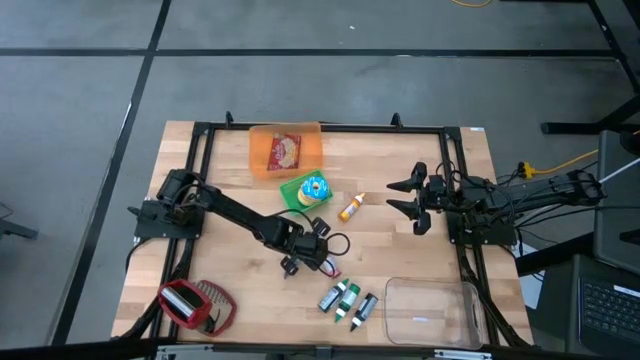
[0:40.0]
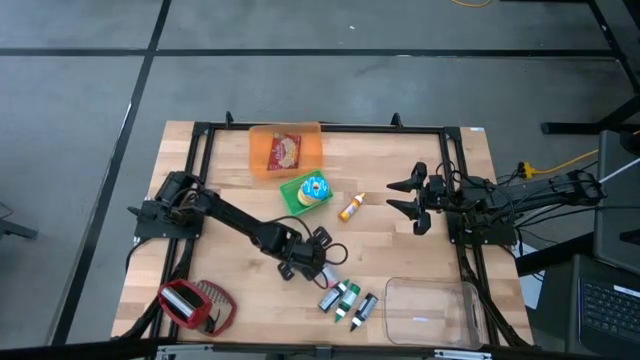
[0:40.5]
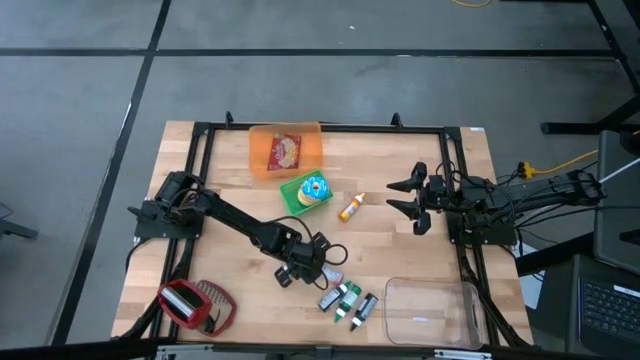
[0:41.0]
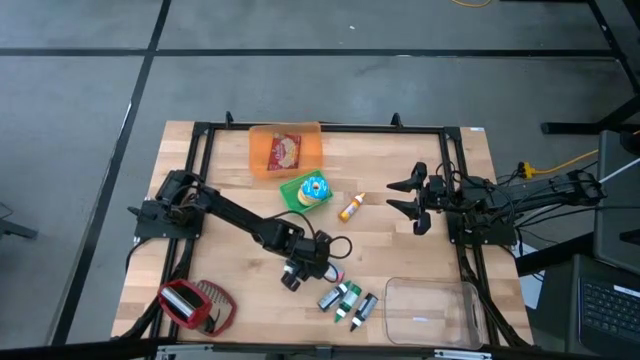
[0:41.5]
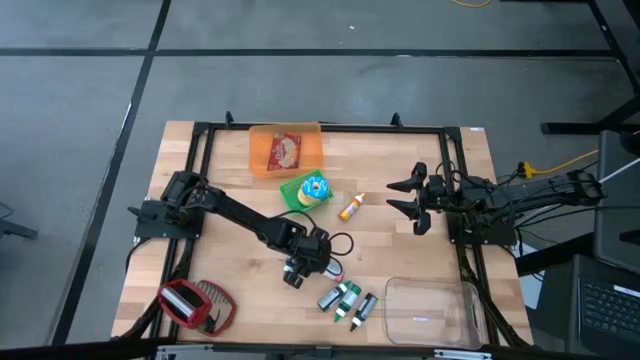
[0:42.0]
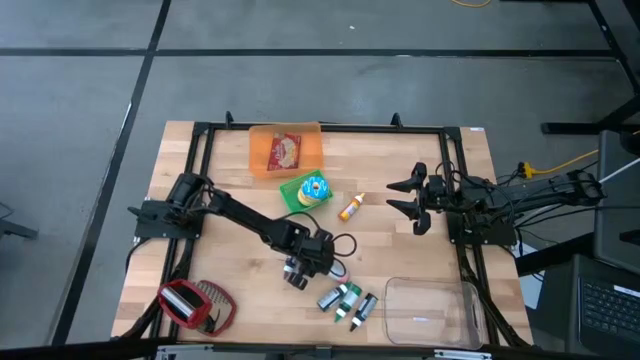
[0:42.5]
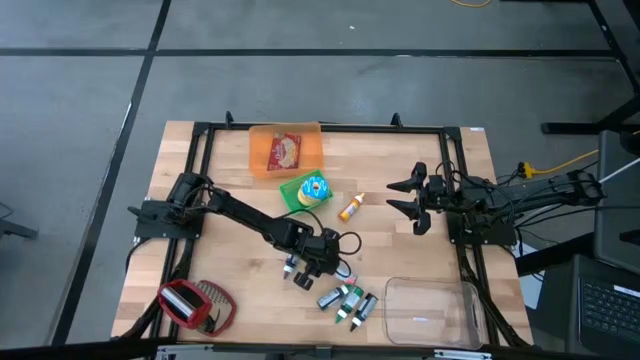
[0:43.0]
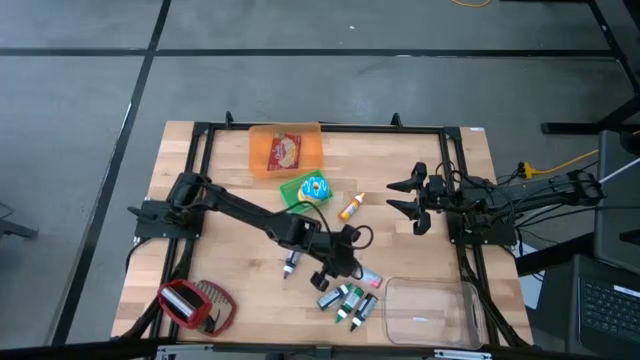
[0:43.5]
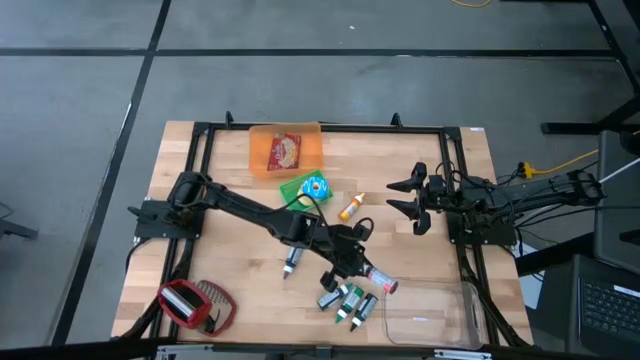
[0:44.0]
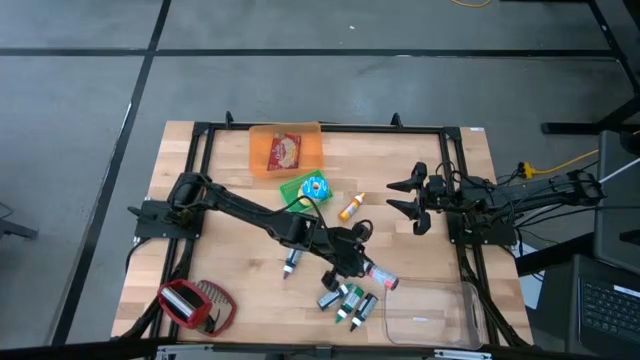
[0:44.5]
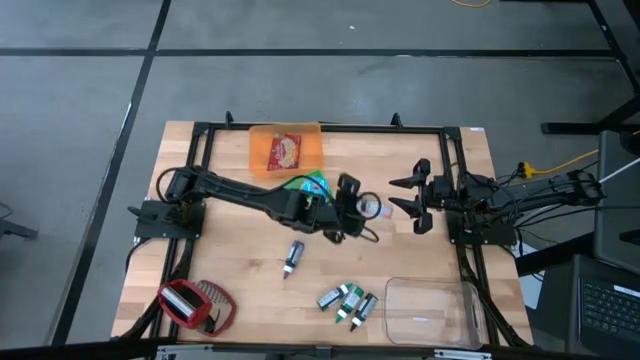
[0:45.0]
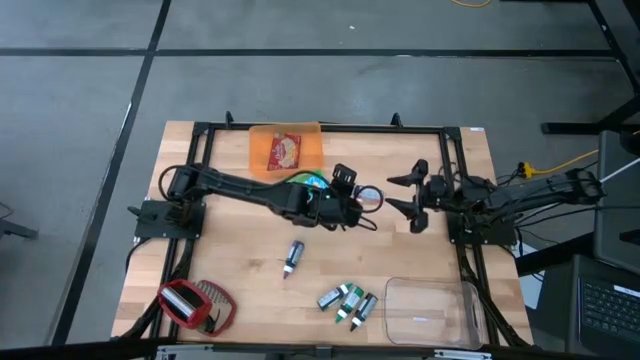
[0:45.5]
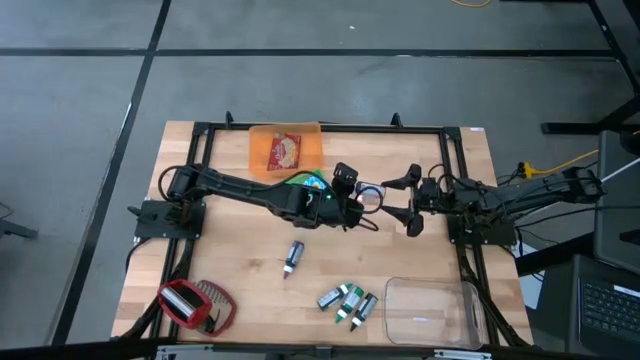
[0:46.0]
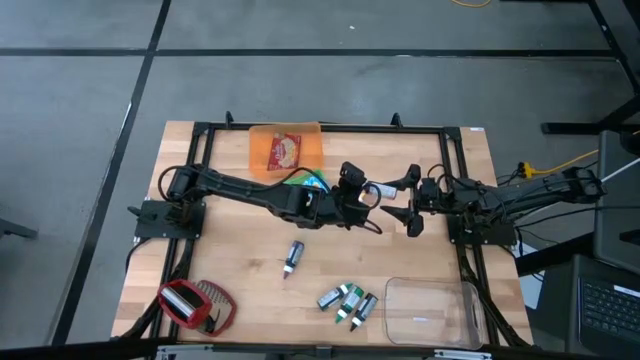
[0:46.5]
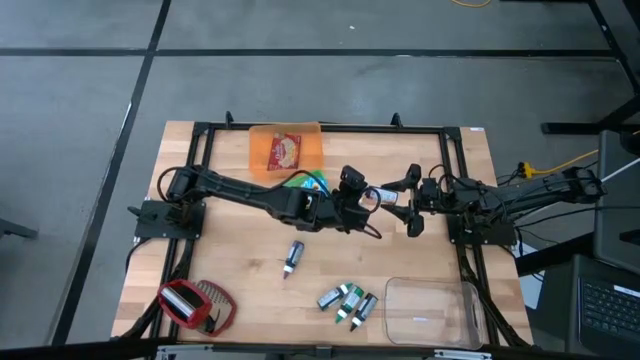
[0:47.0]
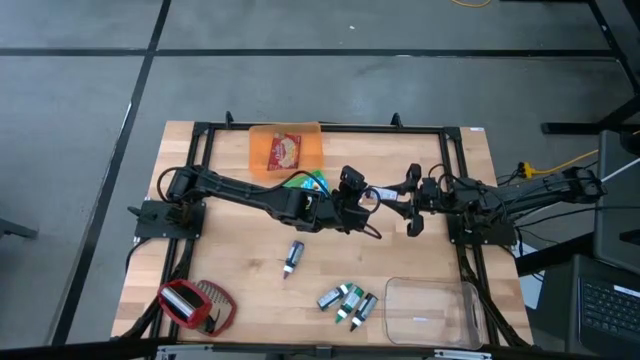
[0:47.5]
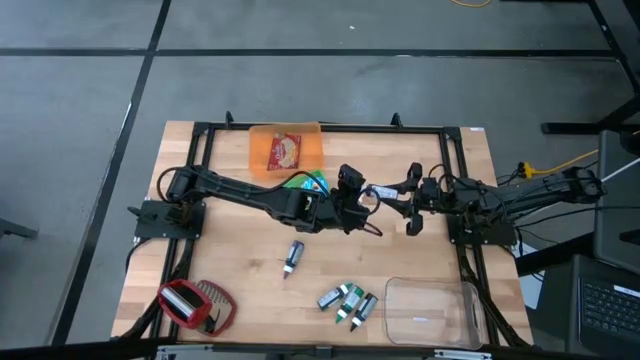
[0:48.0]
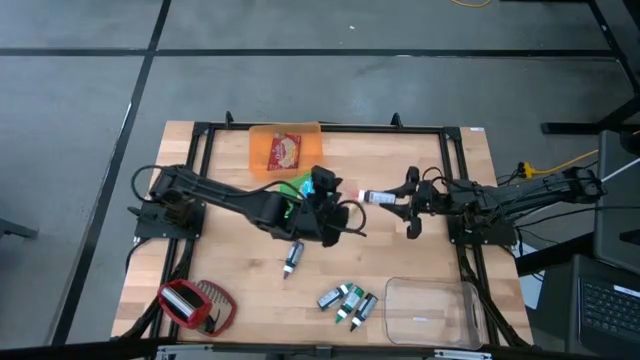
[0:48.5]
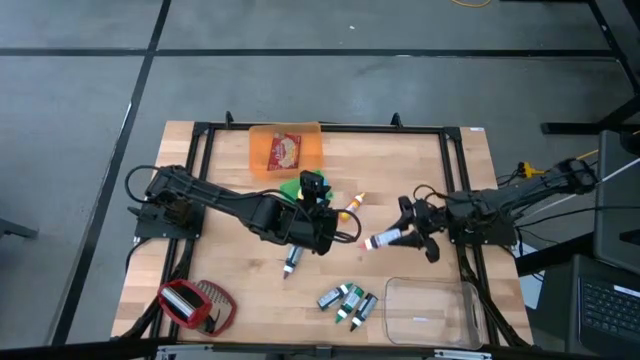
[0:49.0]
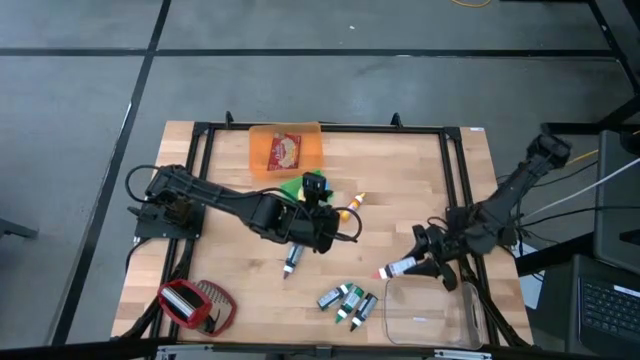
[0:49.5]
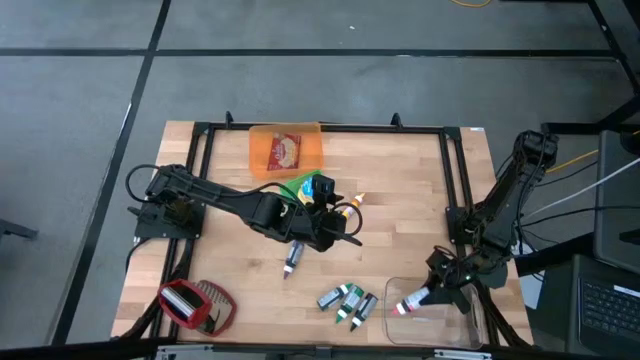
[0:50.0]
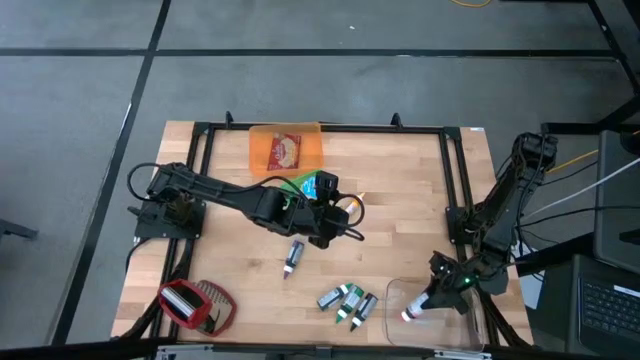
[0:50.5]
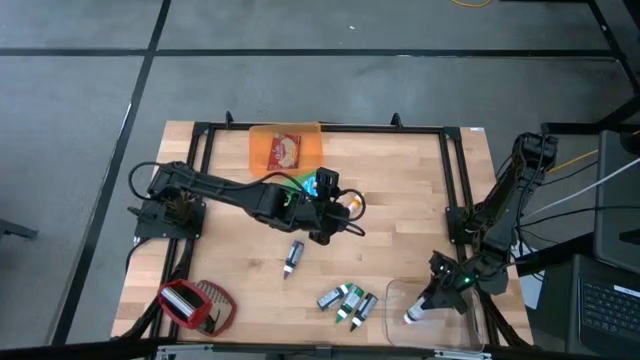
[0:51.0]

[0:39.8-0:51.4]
Put the pink food coloring into the transparent bin

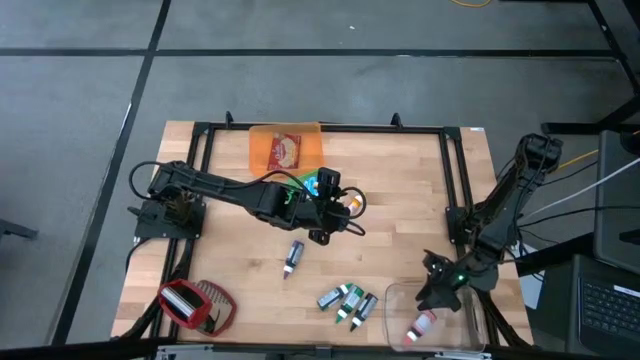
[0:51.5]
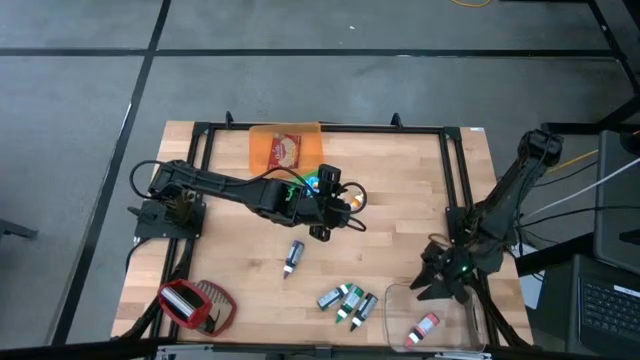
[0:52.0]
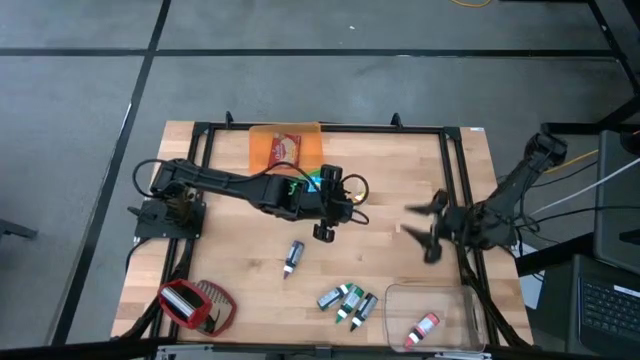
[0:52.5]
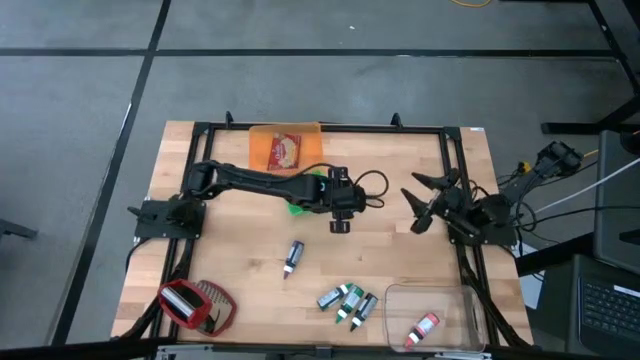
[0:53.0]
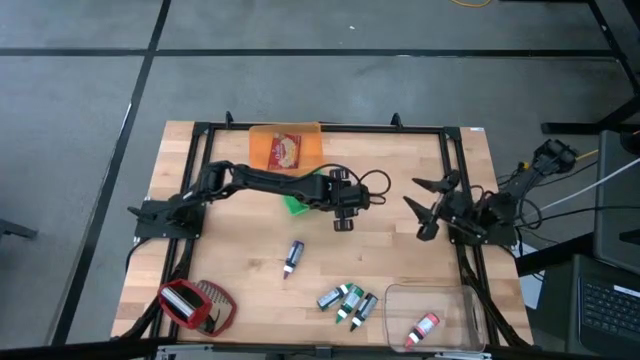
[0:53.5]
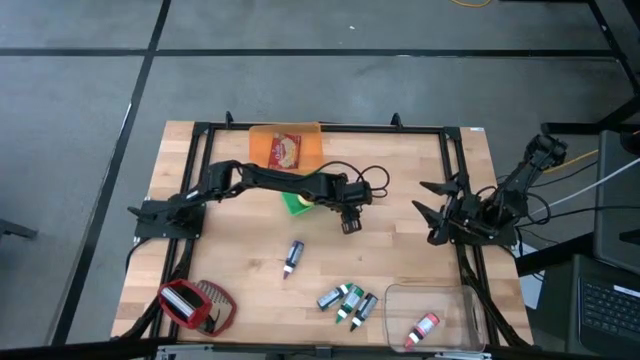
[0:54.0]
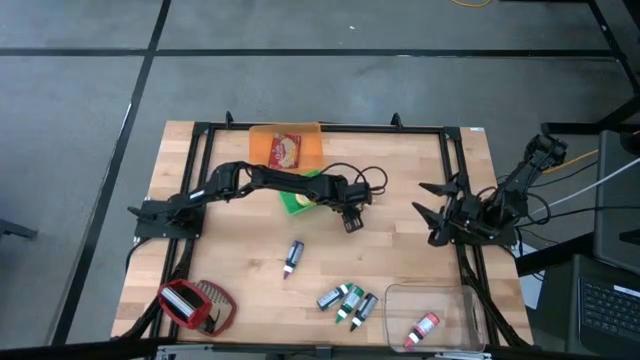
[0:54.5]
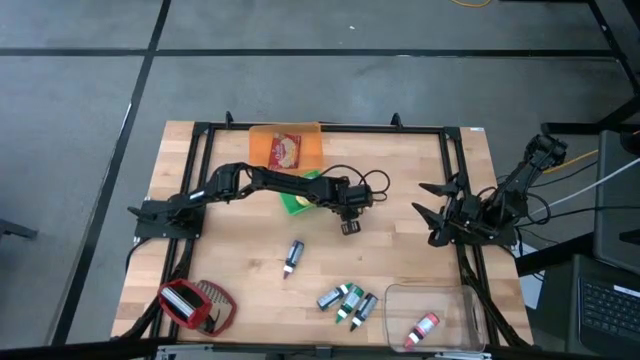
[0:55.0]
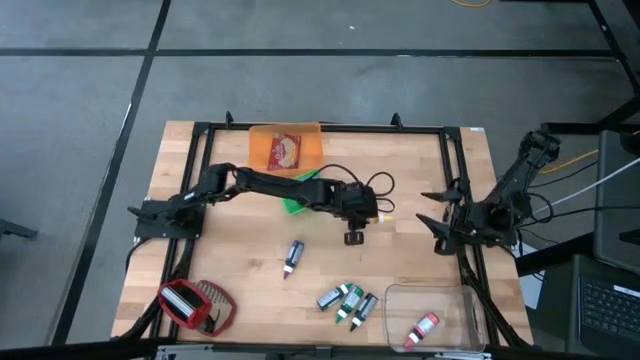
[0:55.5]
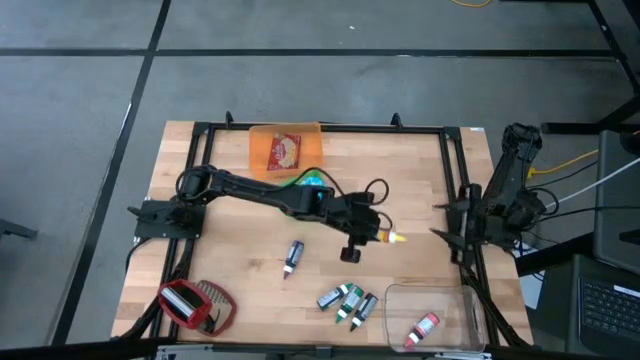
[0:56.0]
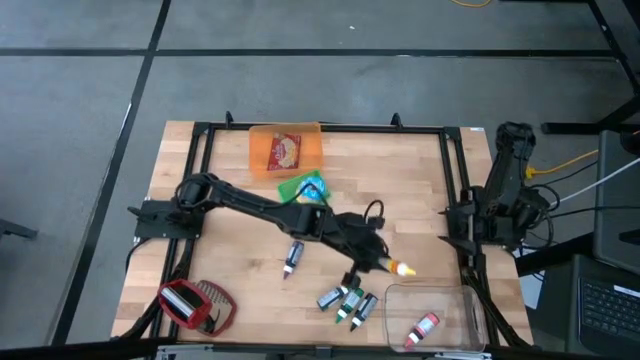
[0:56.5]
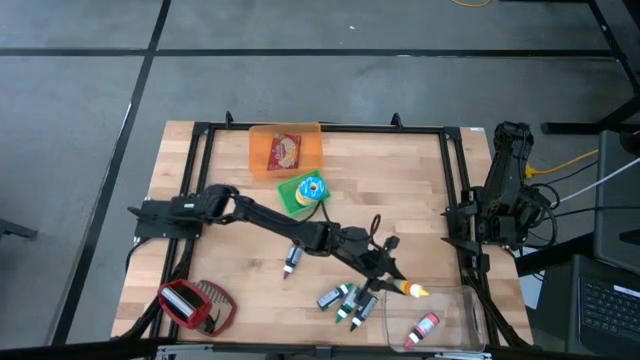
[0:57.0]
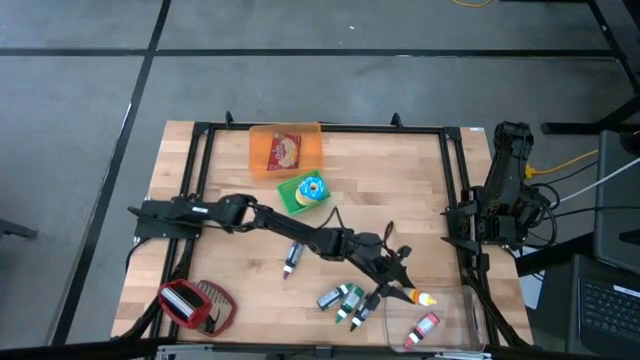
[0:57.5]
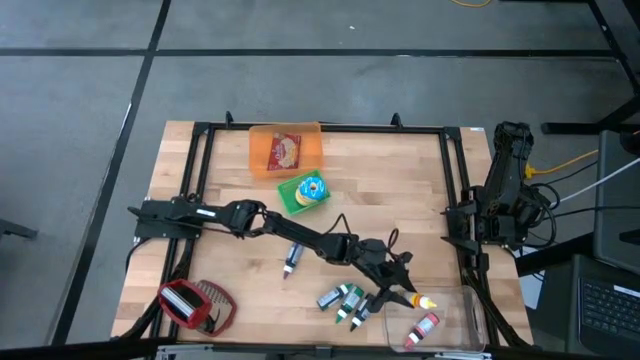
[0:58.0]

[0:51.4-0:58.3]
Put the yellow food coloring into the transparent bin

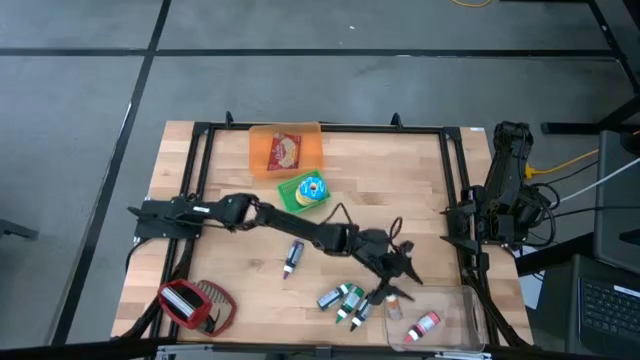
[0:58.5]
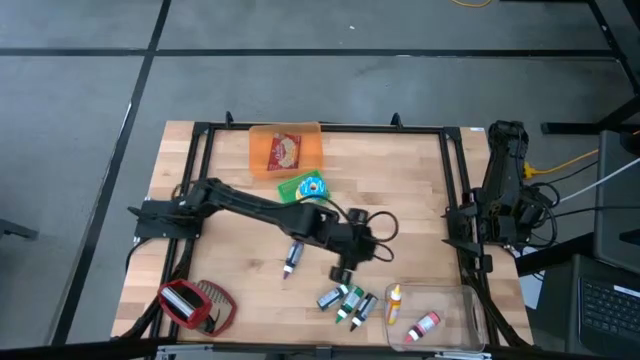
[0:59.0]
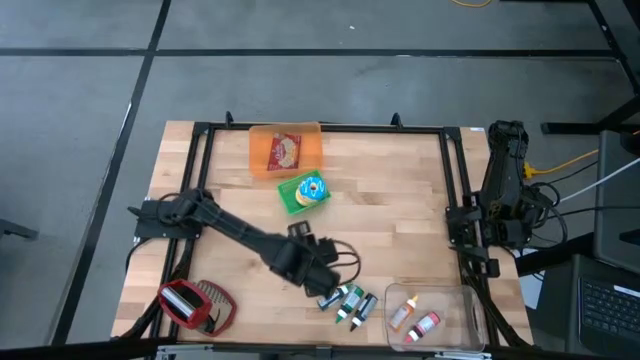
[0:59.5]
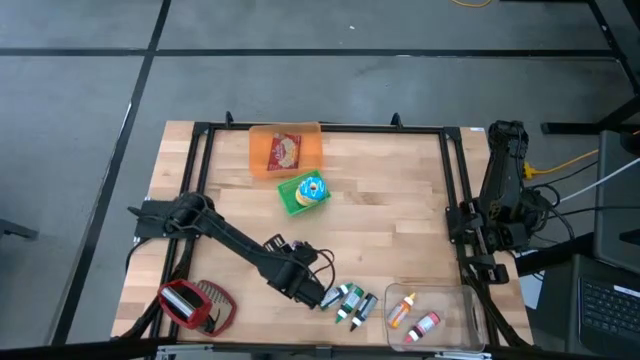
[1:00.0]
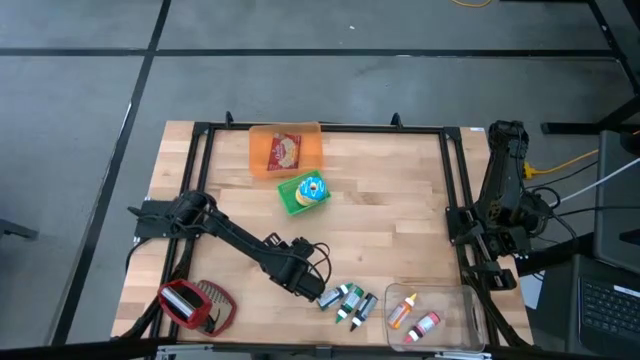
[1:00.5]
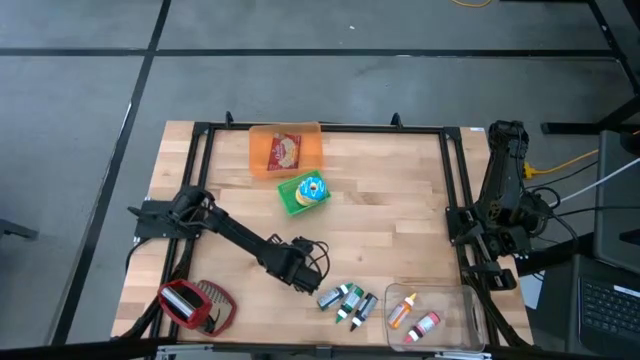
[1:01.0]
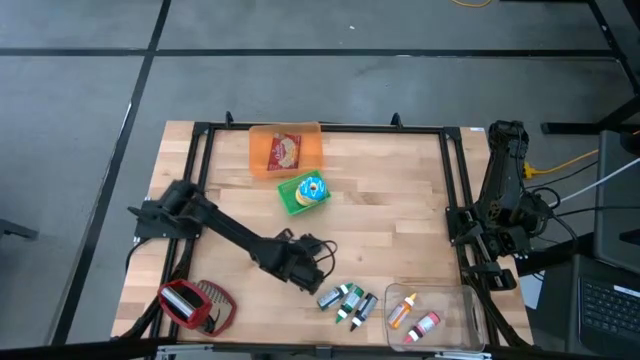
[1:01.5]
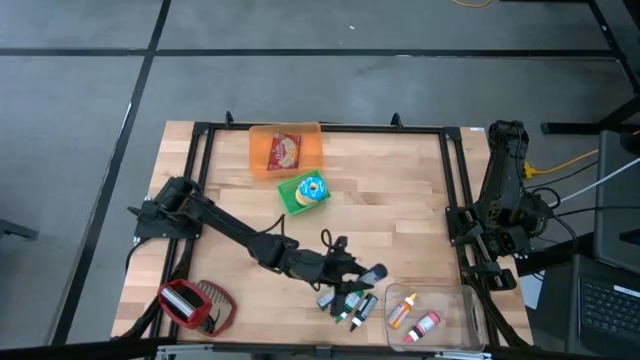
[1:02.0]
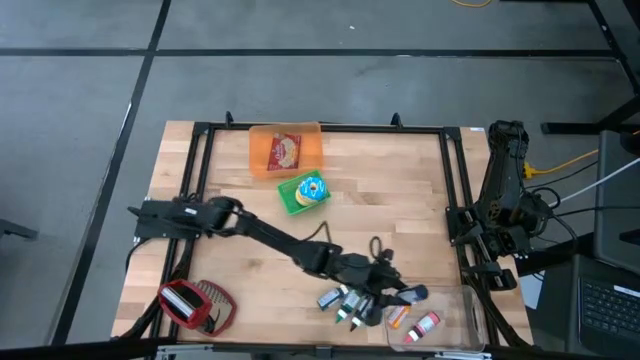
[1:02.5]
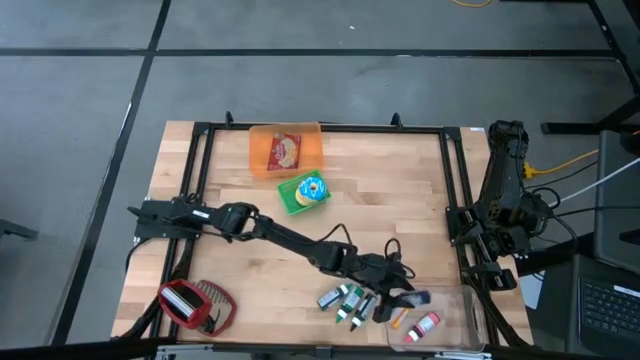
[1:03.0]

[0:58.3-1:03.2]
Put the purple food coloring into the transparent bin
